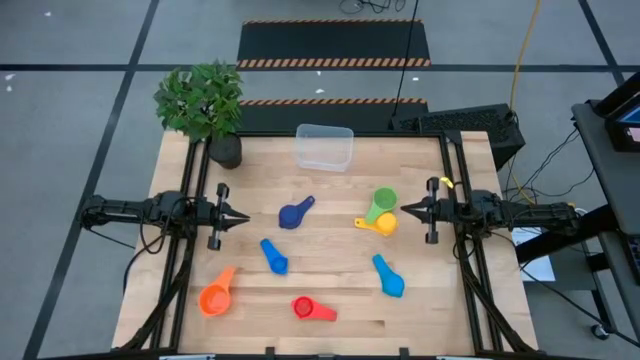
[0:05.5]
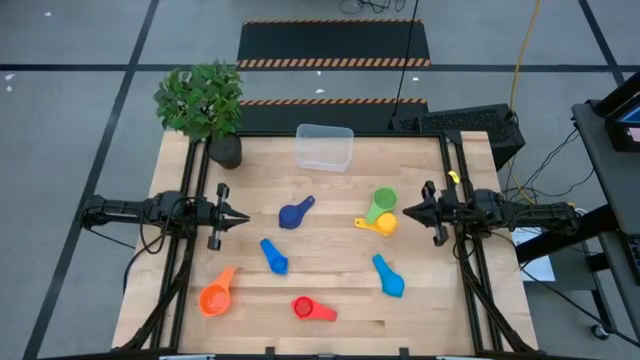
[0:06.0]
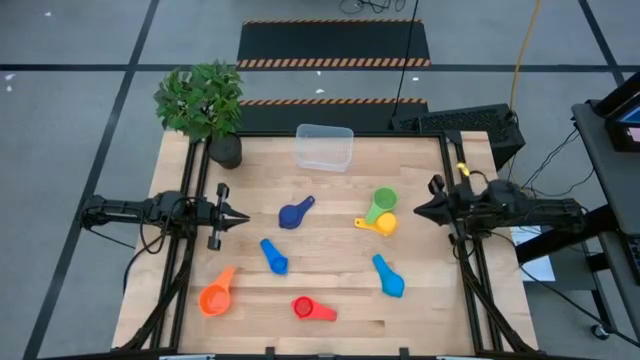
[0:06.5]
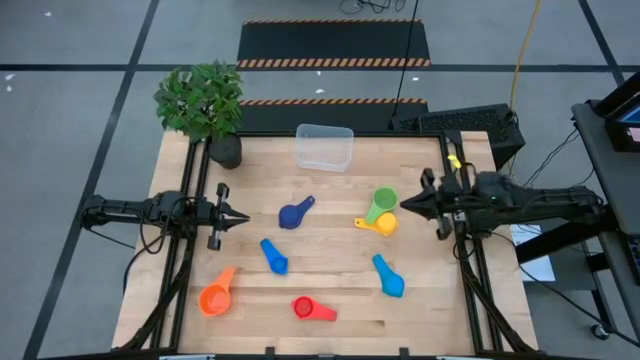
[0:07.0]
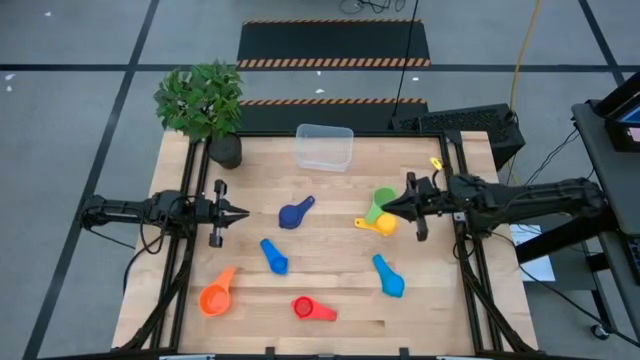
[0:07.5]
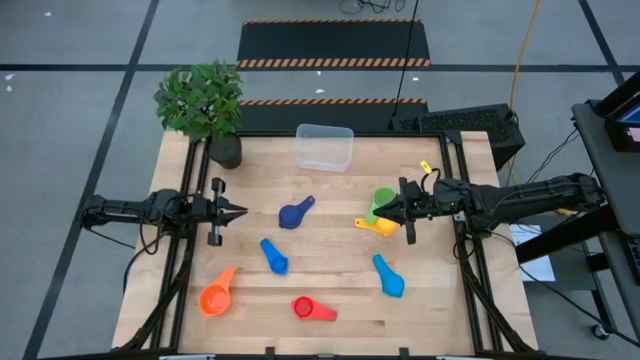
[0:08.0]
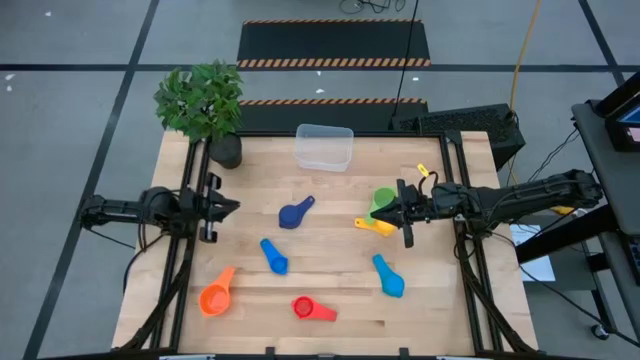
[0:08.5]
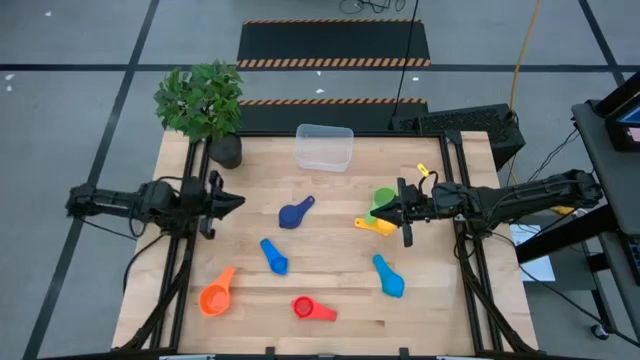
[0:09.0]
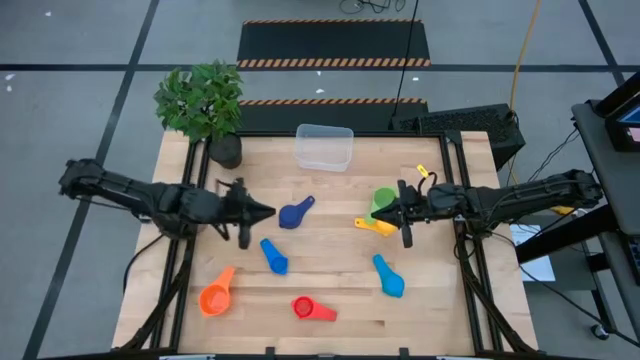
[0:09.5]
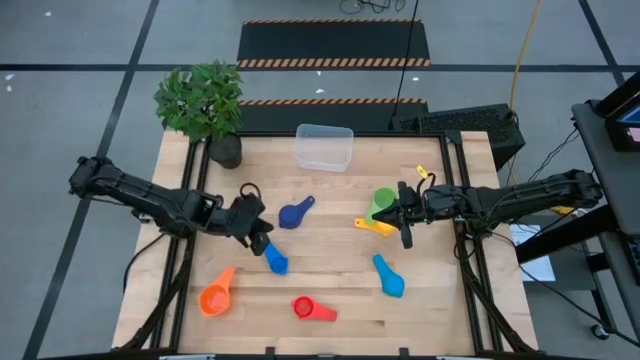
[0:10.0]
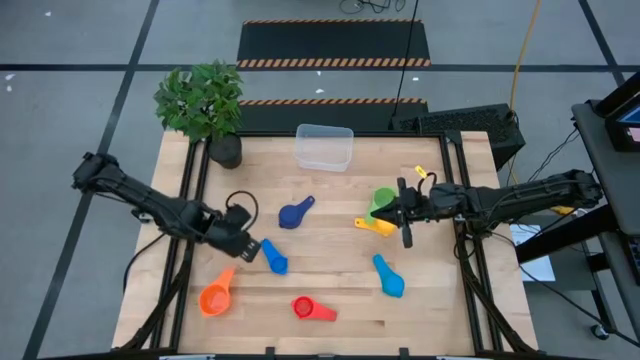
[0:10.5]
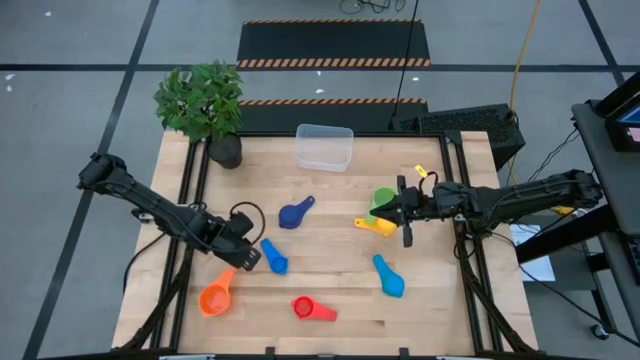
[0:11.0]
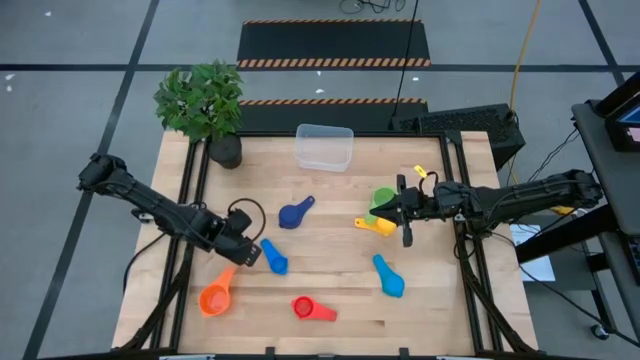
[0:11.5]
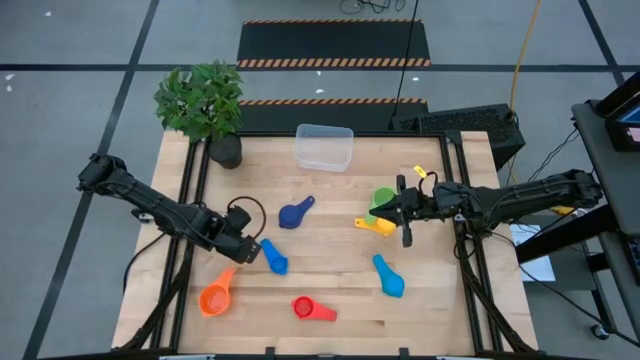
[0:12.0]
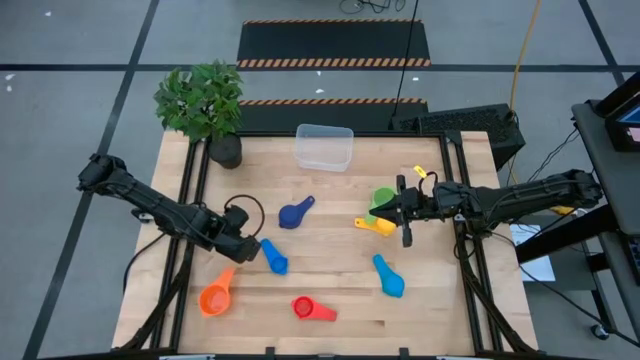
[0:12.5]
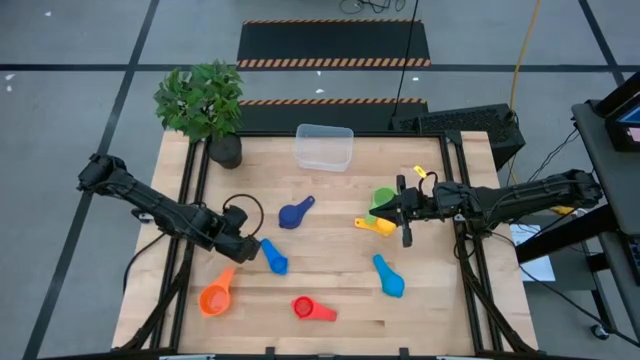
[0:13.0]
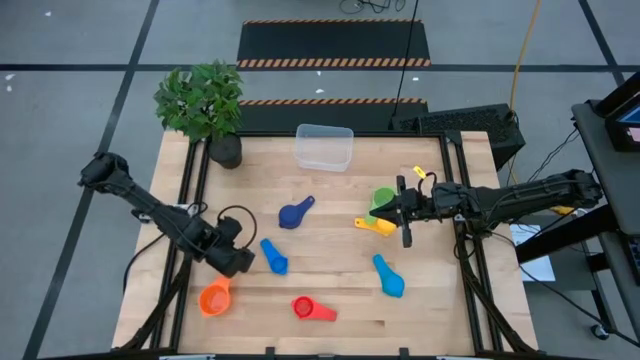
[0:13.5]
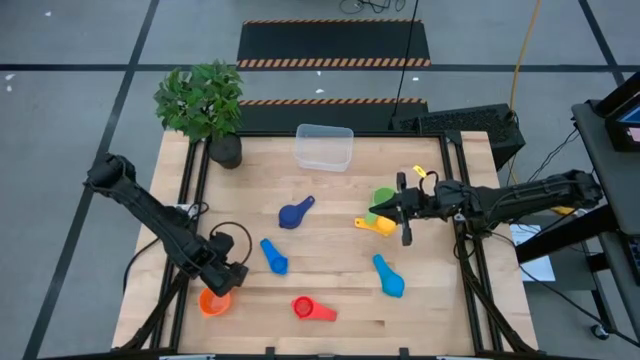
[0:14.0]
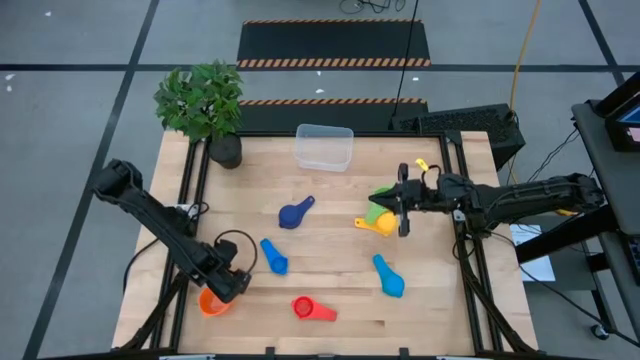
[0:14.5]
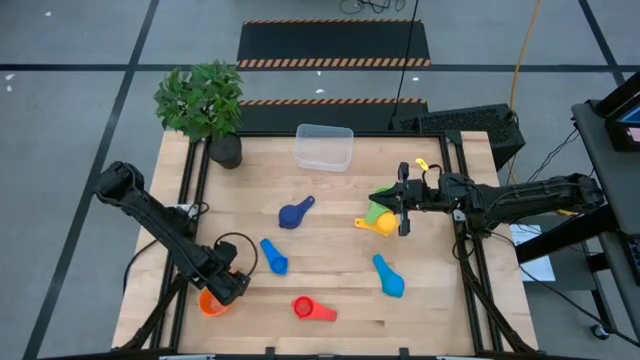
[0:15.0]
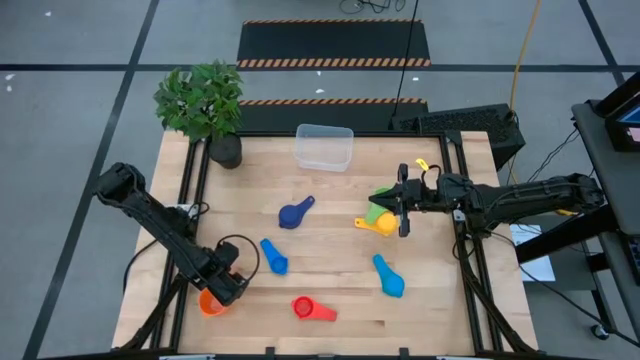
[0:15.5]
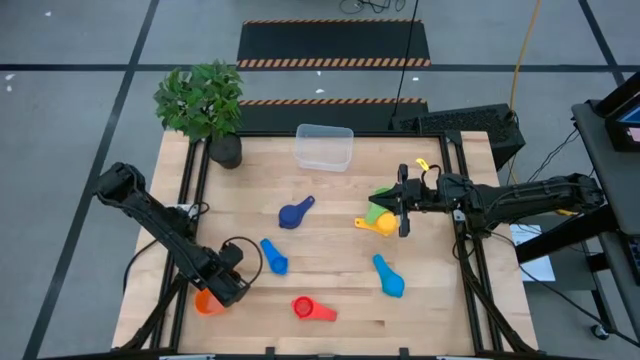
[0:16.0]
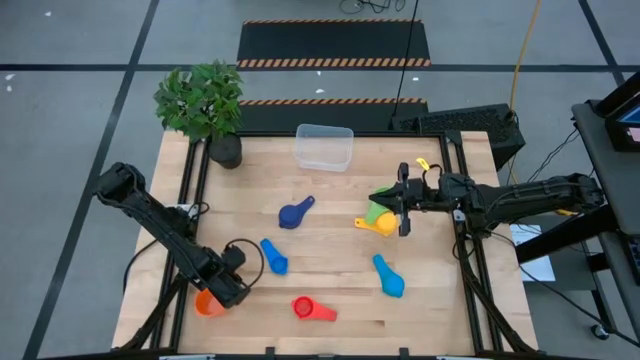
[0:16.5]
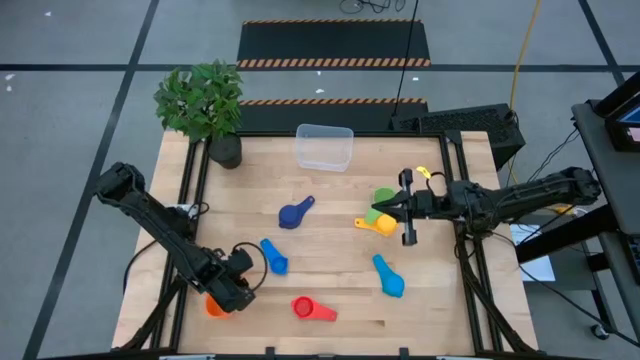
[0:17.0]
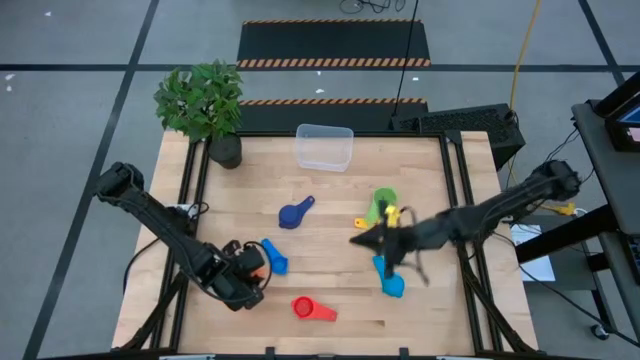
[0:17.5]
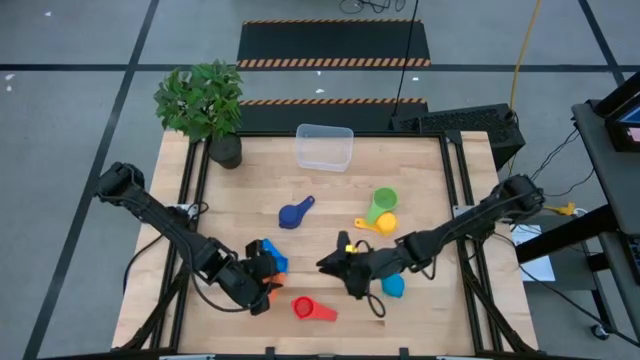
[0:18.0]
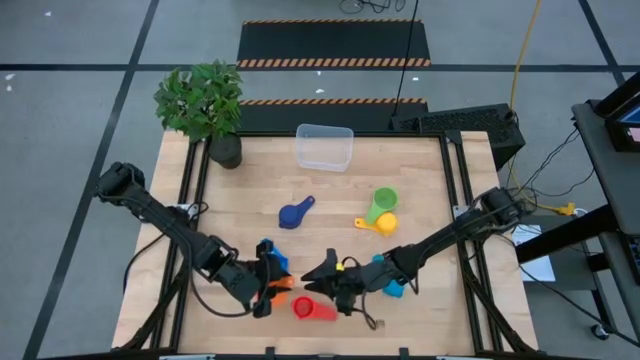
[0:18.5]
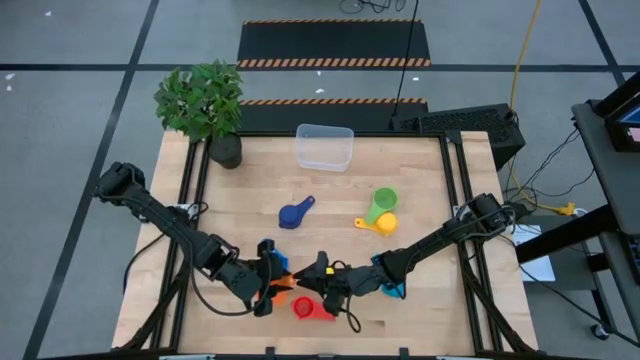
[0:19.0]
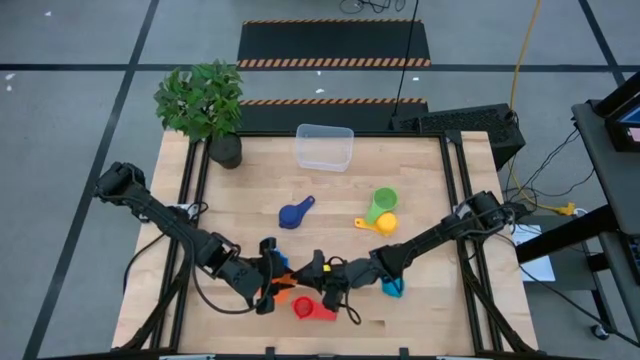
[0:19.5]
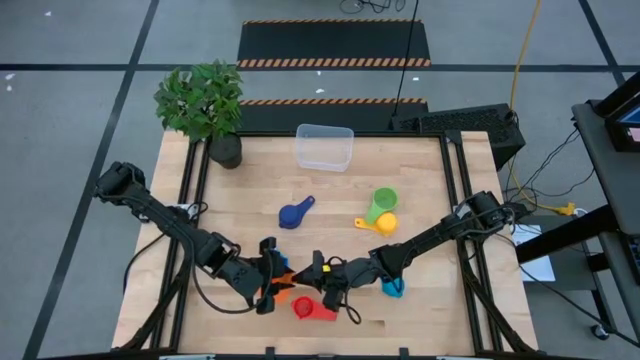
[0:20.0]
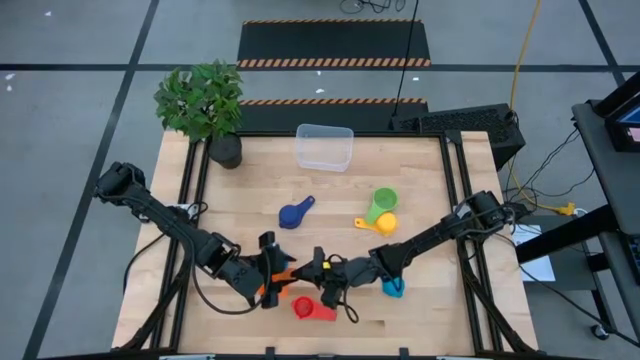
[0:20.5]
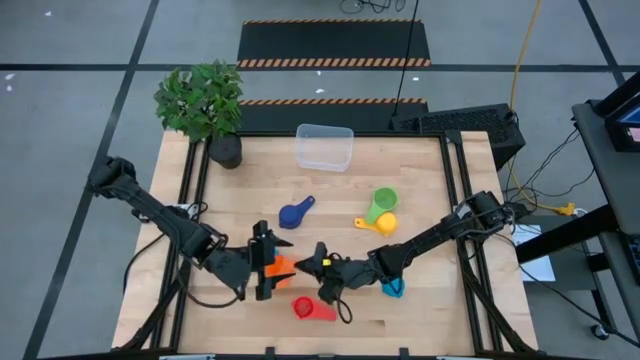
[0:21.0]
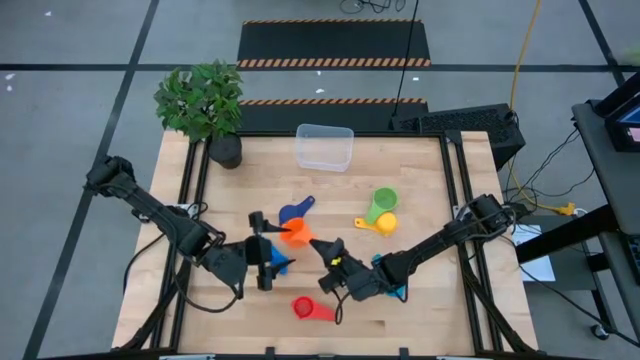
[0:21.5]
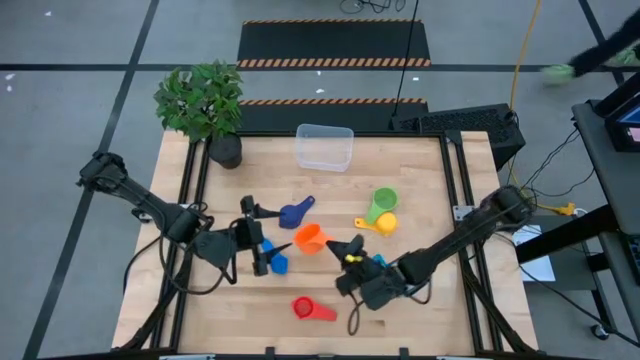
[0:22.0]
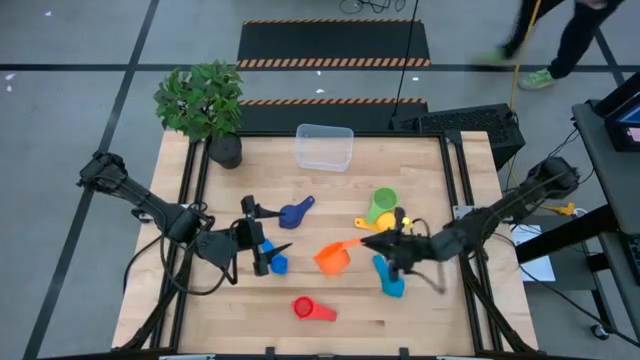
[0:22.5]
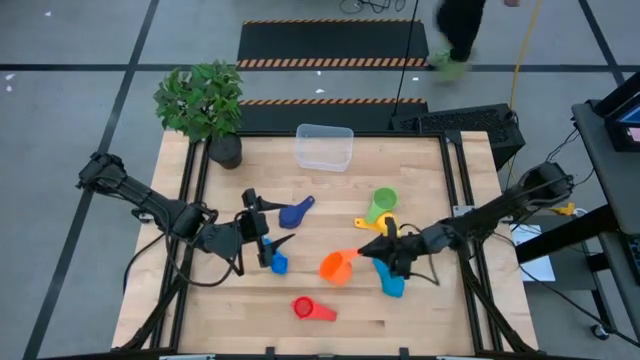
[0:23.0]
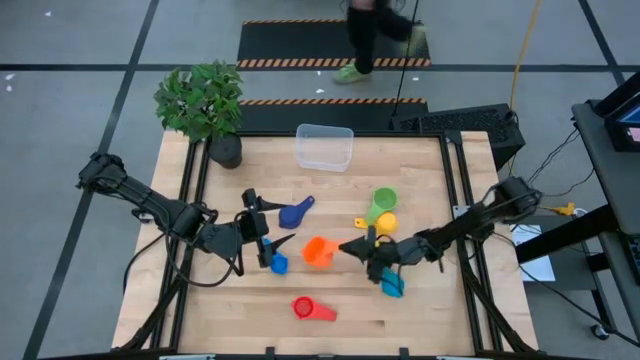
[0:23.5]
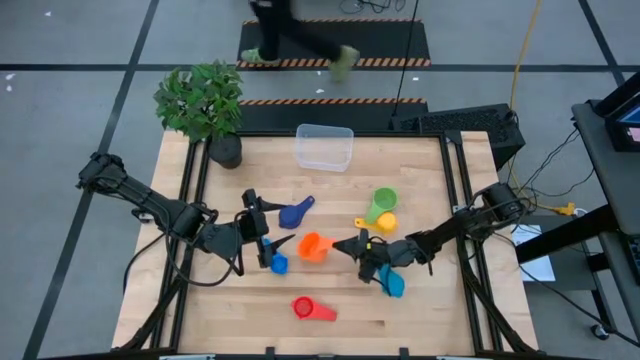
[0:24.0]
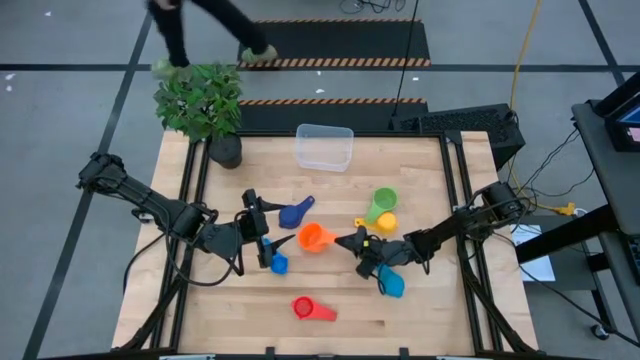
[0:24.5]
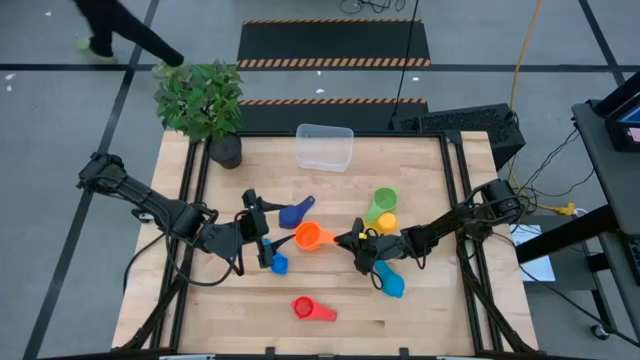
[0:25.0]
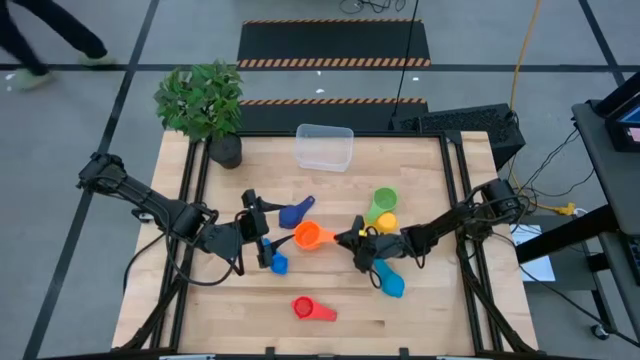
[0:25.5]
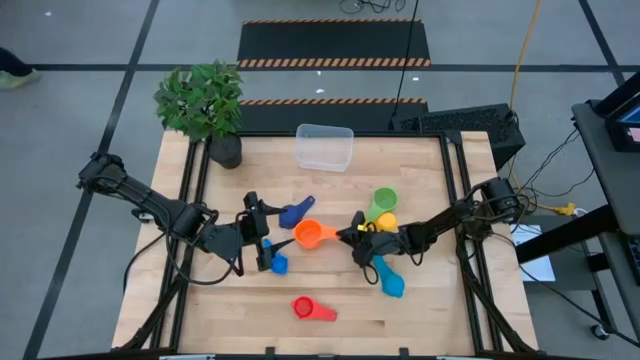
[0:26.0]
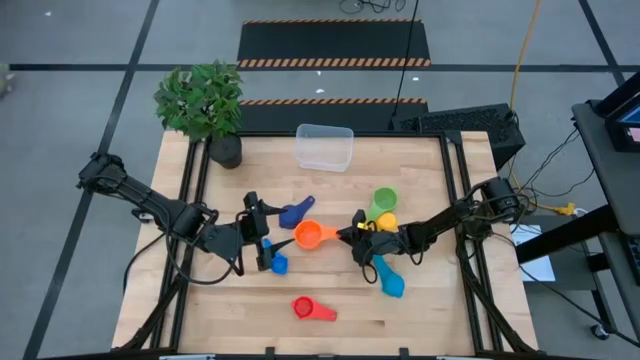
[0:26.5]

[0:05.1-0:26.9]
Task: Nest measuring cups in basket
Move the orange measuring cup to the center of the table
